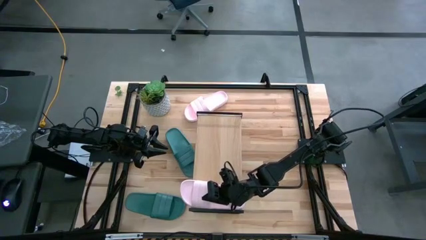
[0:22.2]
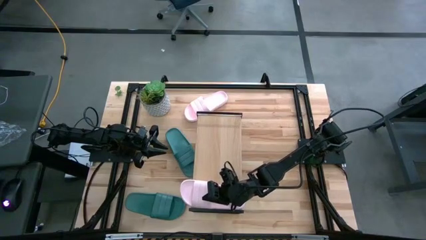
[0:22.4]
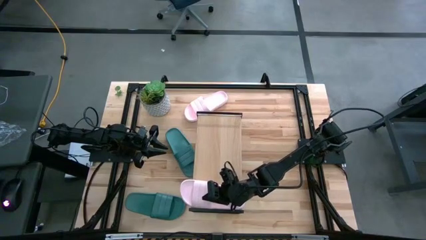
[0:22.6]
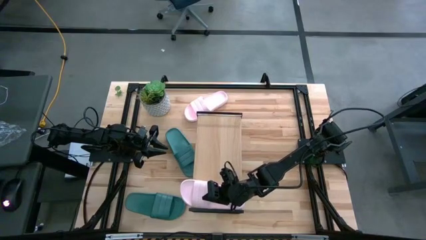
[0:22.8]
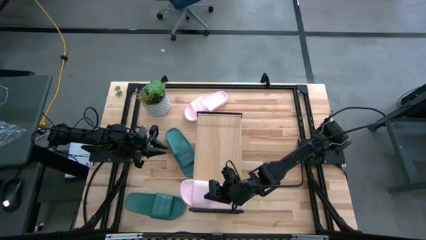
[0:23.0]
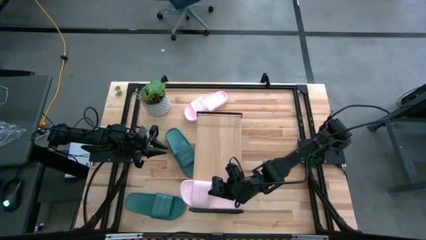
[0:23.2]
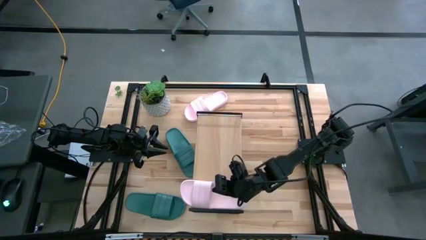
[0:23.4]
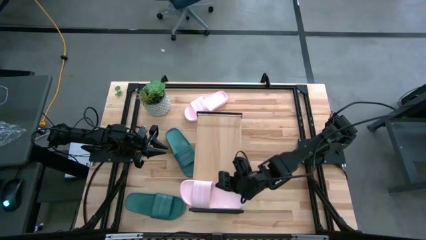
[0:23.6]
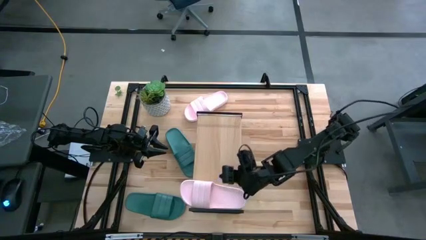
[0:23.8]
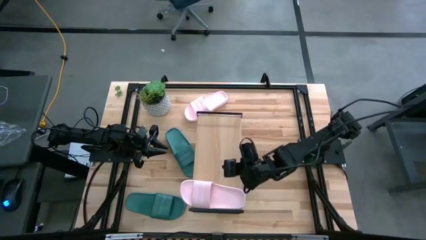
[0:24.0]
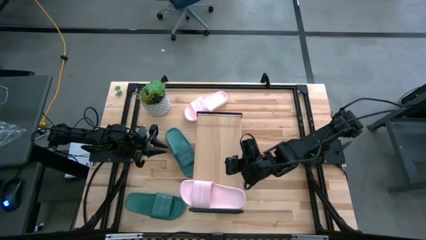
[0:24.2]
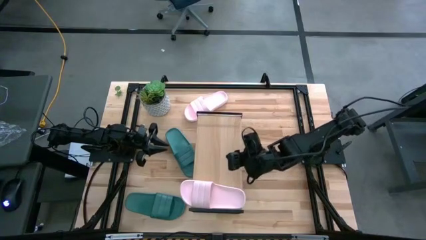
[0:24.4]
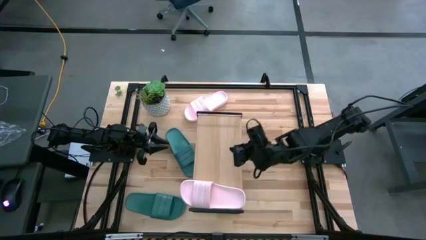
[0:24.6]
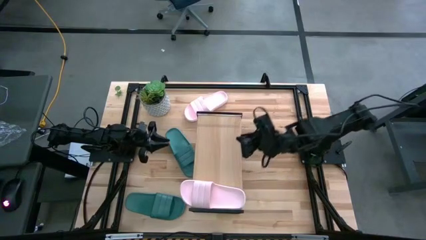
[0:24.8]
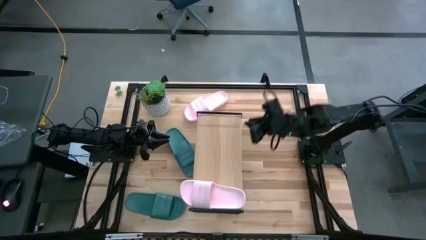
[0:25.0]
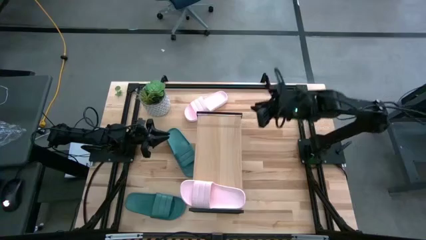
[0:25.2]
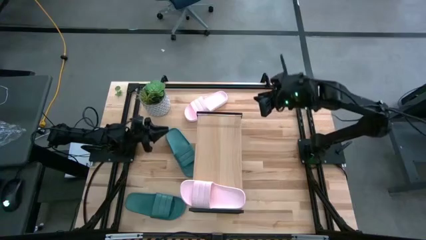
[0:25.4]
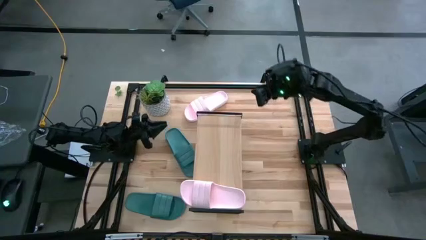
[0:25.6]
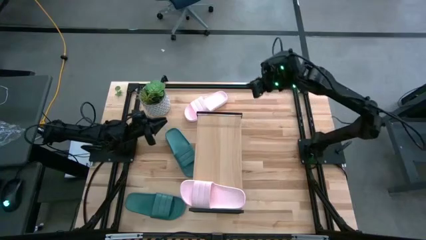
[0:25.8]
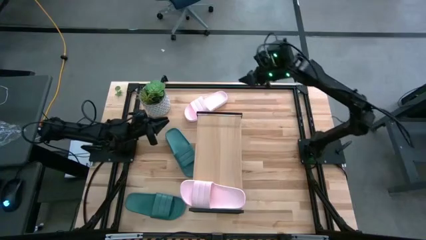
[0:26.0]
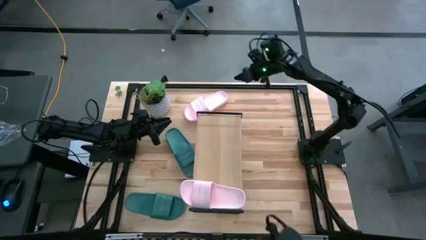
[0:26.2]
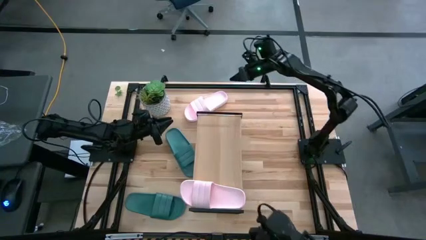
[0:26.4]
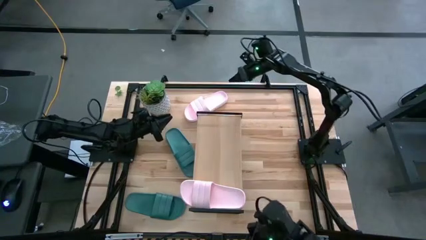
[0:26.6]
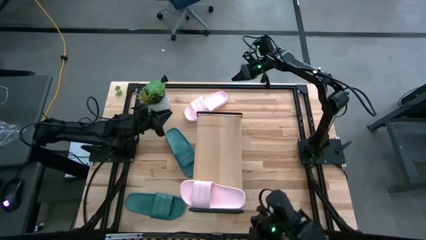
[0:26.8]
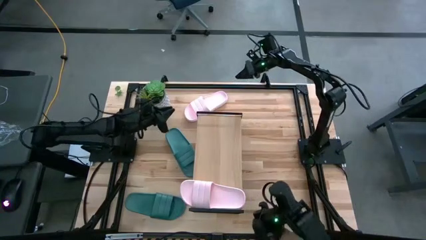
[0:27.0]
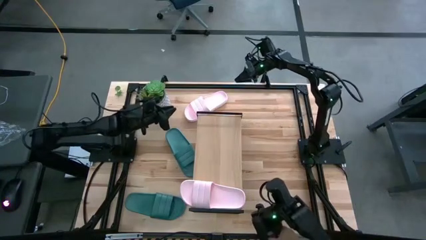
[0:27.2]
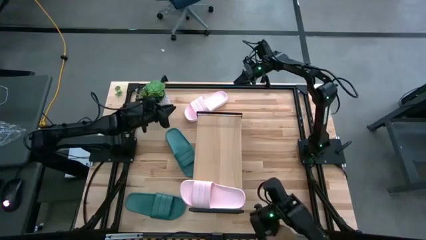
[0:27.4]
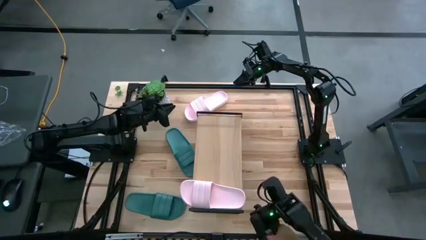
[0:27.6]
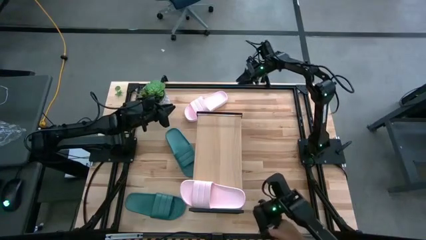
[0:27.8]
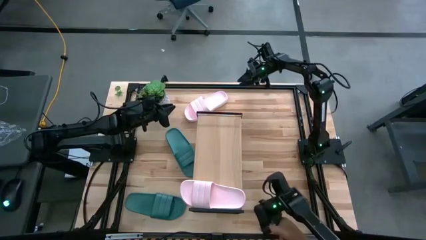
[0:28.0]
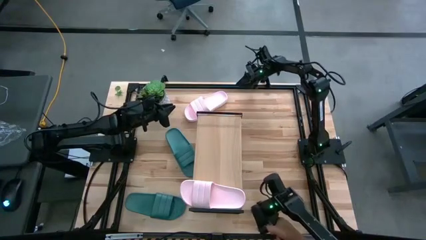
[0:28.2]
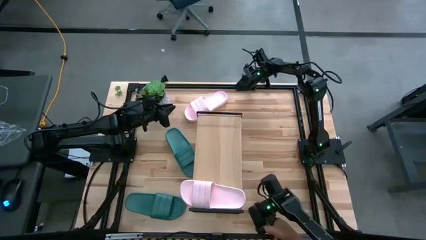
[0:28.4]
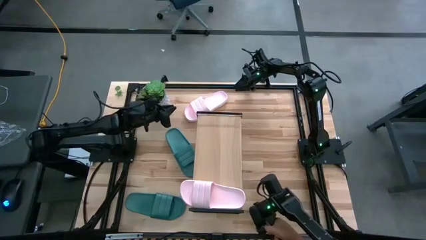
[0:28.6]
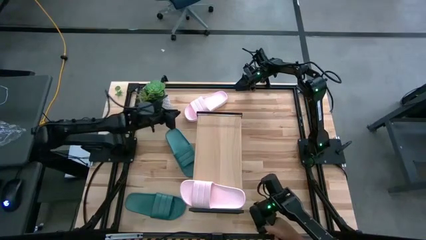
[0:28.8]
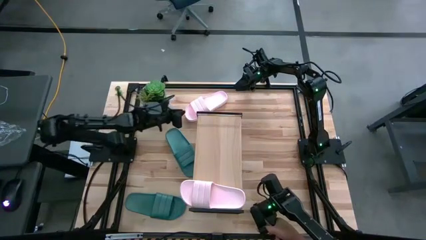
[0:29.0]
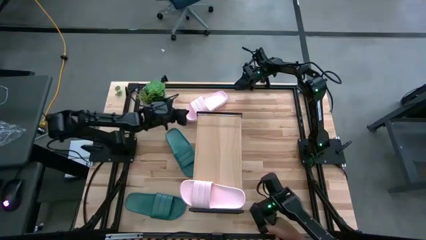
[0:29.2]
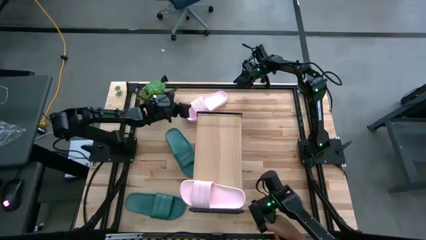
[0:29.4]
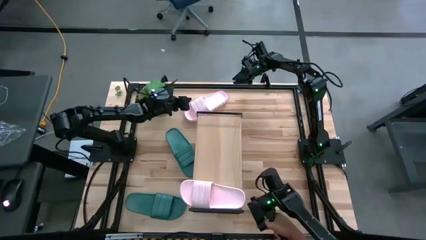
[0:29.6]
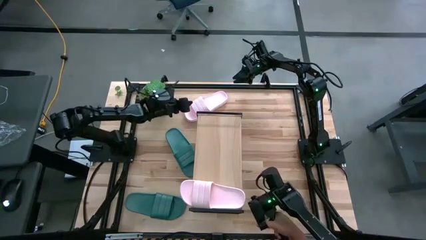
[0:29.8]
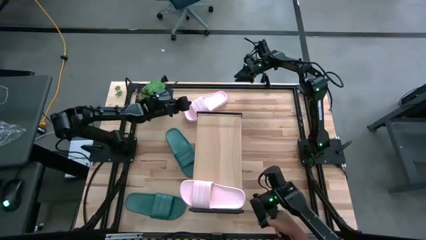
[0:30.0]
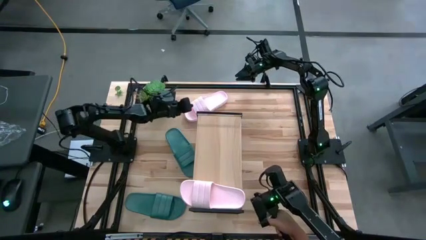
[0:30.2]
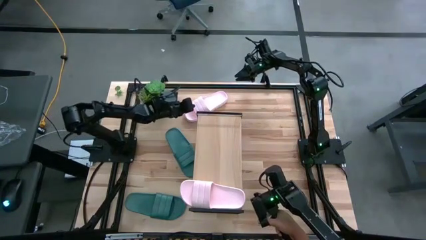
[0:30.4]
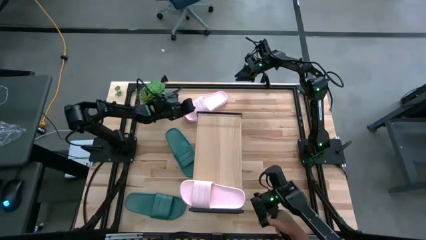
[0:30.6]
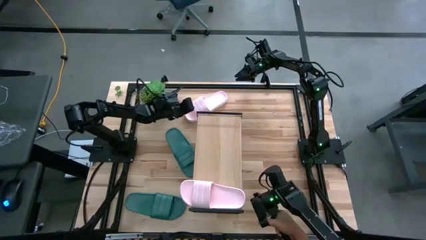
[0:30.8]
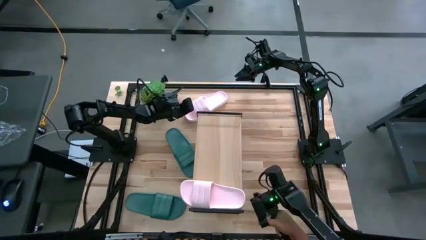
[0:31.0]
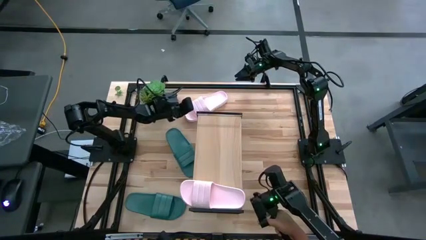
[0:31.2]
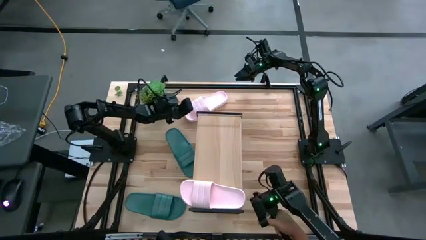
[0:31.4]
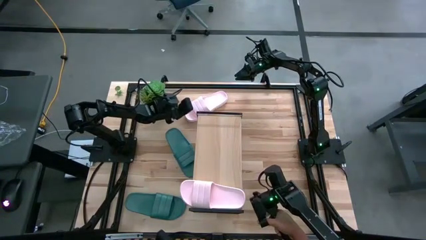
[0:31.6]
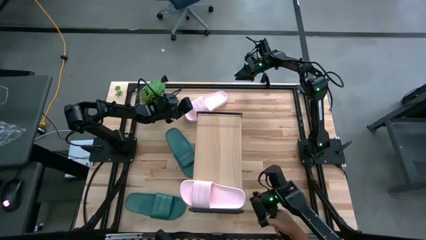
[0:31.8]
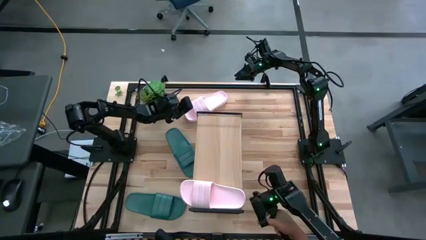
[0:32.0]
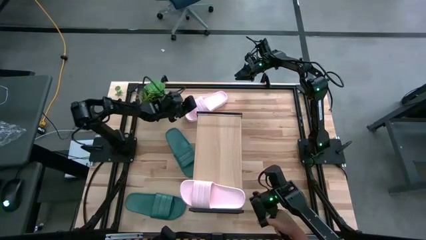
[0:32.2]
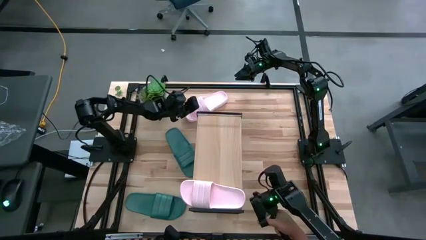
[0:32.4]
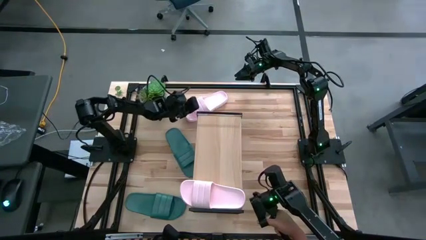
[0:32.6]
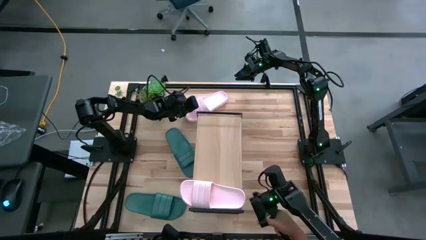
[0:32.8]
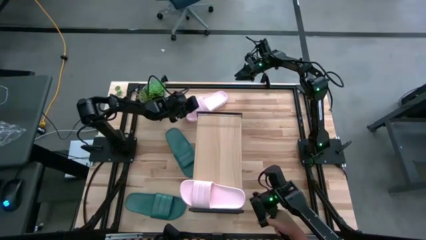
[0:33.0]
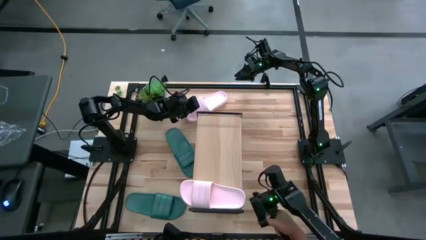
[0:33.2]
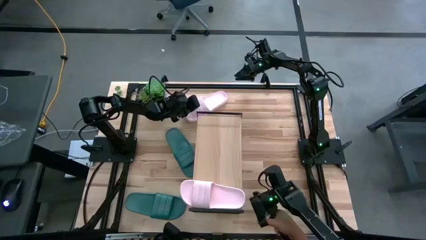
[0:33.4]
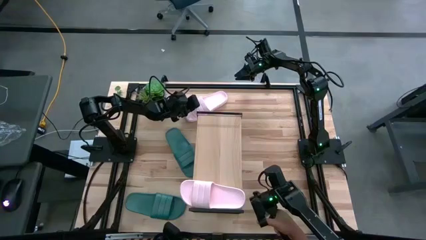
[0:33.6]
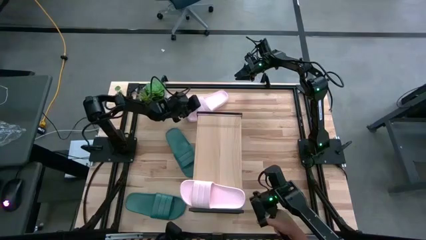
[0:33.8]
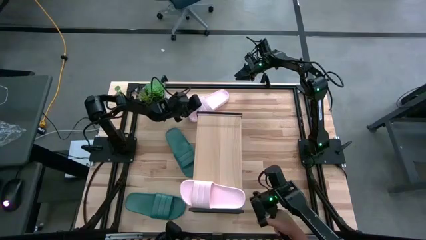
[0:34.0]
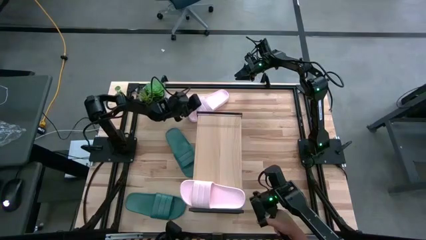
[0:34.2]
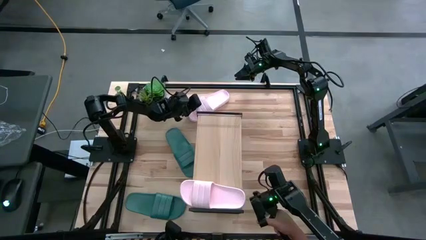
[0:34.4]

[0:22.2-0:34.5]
Task: Pick and place slides into the shelf
Put the pink slides on the shelf
